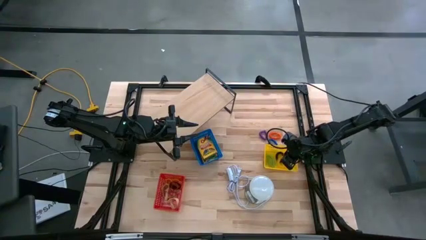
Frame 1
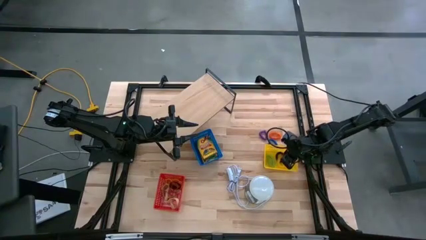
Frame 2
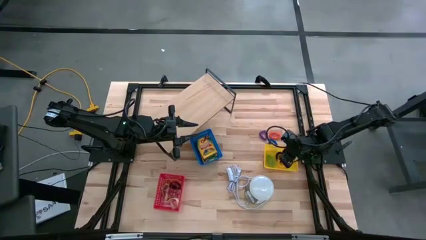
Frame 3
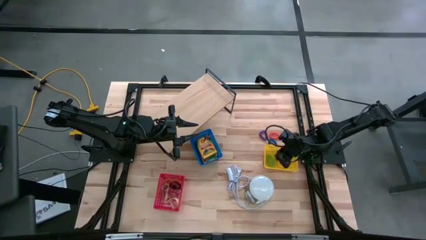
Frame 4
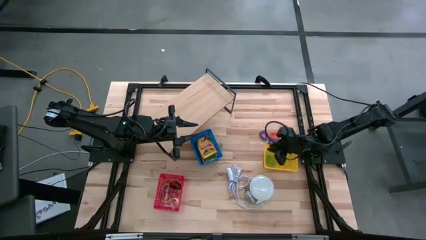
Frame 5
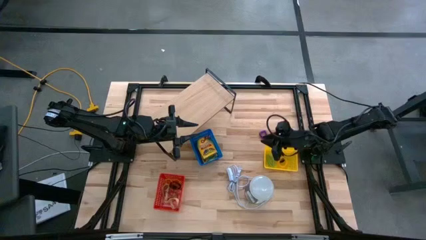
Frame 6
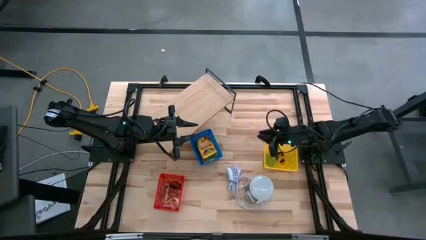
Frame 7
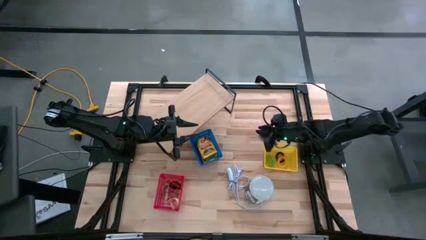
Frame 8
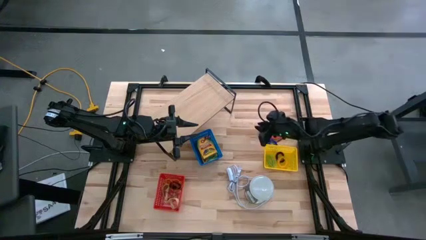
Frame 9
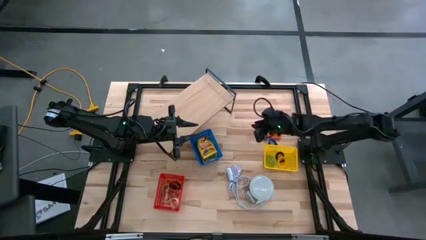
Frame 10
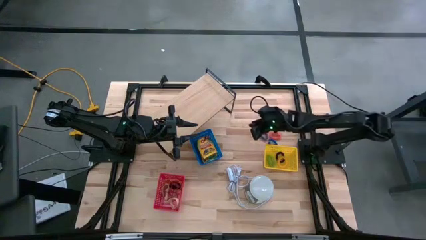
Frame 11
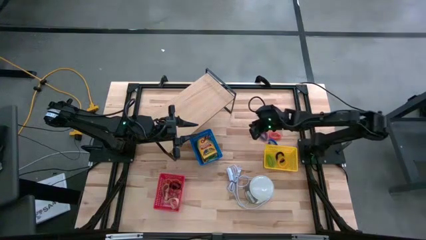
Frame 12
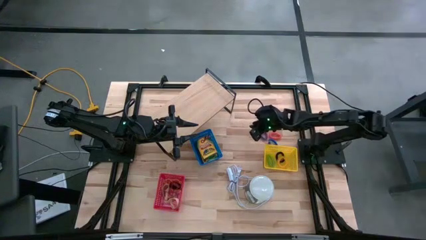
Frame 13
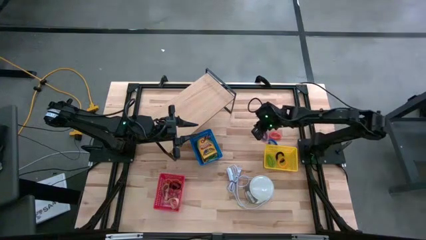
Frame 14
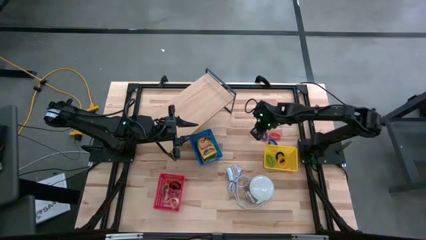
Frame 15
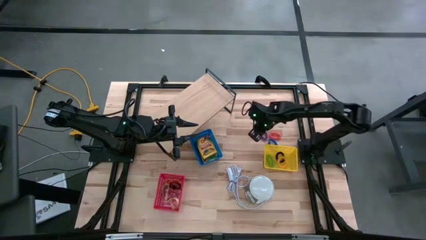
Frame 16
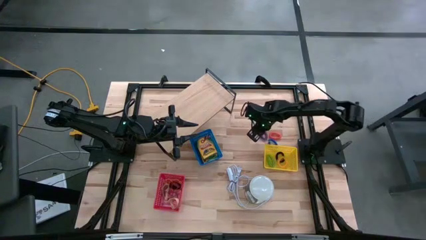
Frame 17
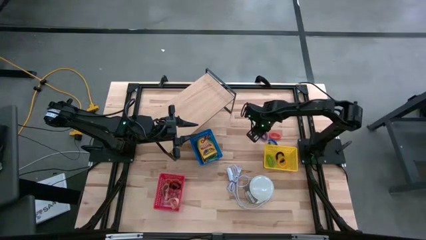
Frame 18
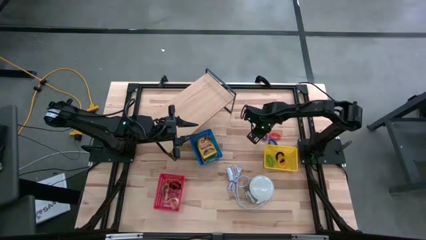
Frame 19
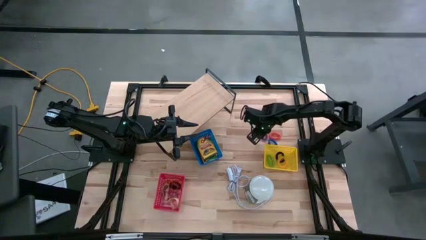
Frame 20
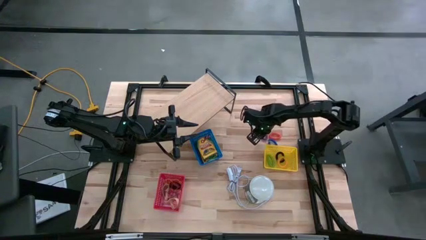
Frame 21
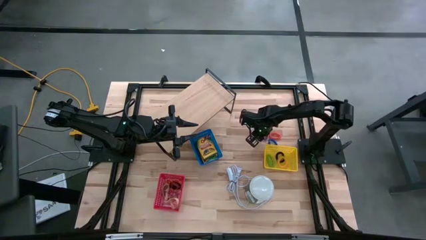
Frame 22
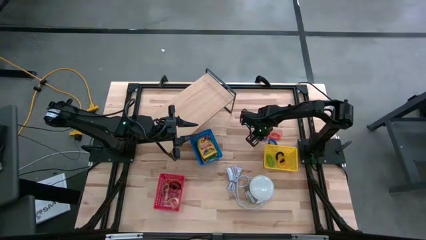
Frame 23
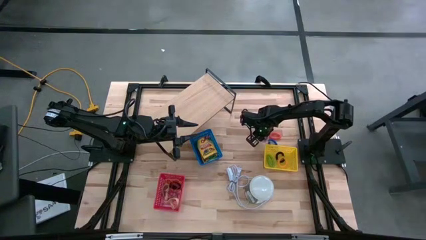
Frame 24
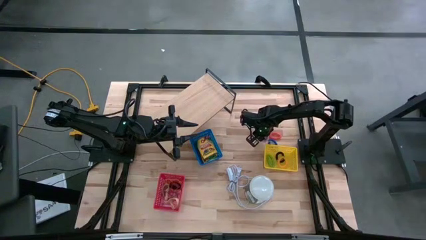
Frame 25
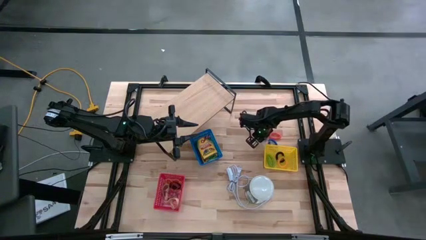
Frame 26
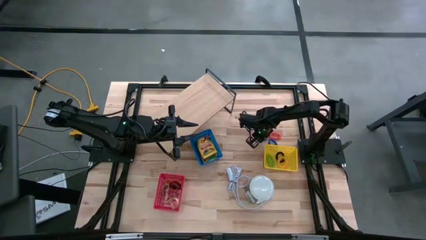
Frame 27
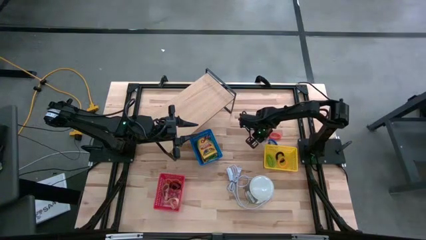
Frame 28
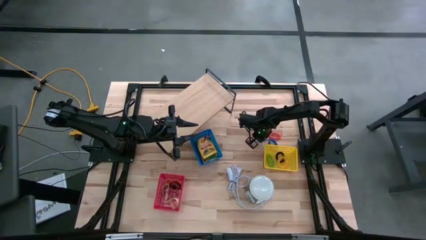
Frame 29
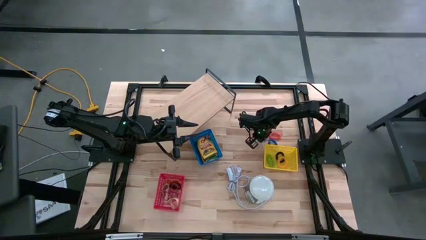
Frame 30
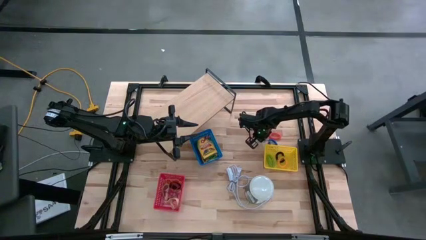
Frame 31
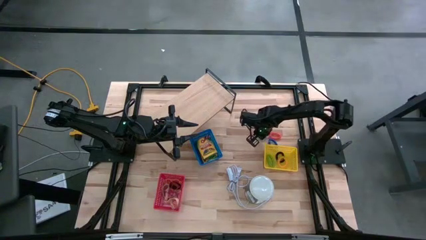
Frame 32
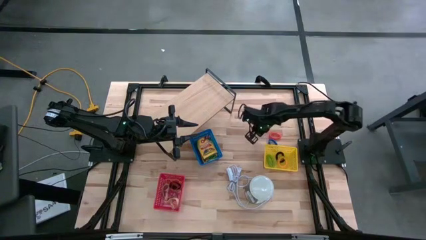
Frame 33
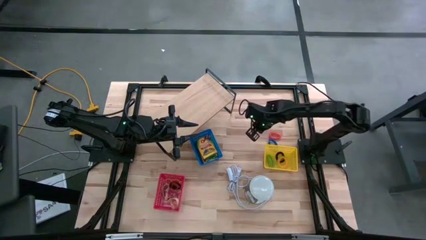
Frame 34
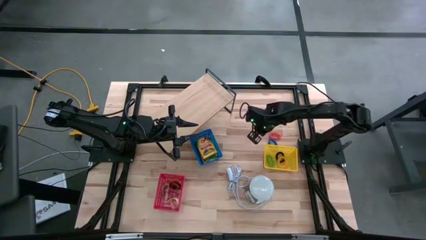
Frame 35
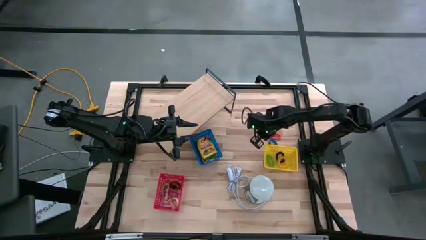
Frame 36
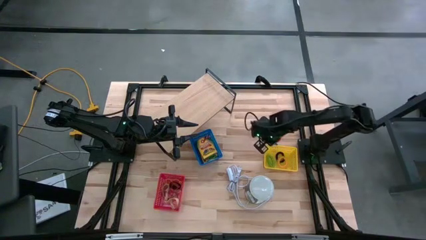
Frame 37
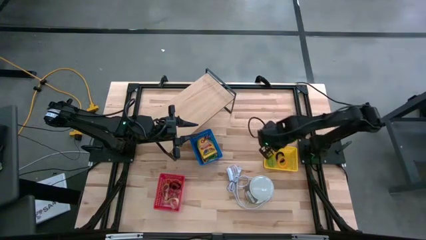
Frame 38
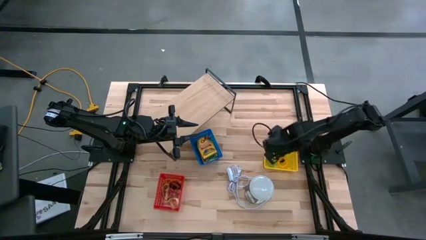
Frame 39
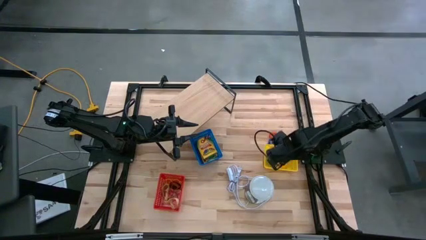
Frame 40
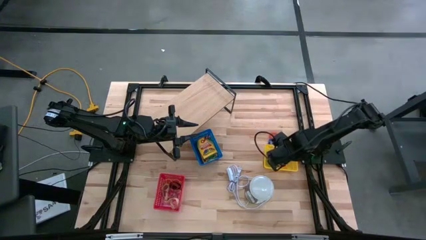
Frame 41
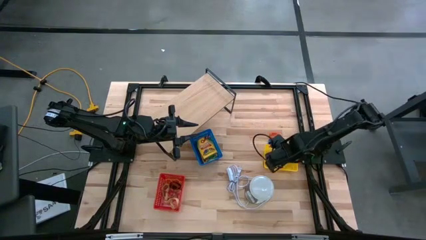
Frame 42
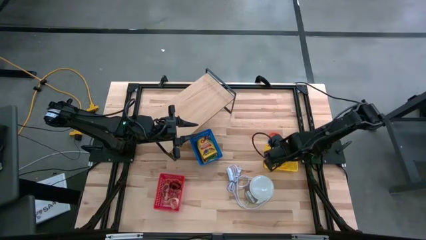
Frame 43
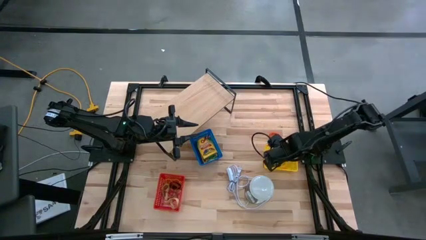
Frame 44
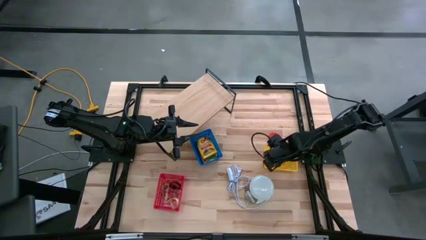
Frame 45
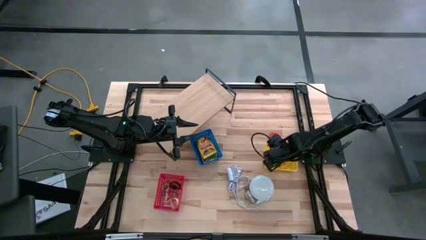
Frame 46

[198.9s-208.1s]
Task: Pick & Place Office Desk Supplies
Put the violet spring keychain into the yellow bin

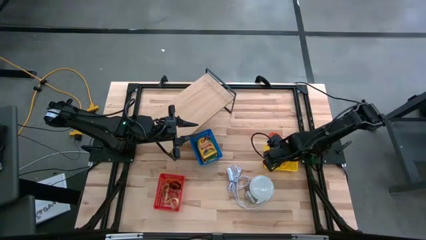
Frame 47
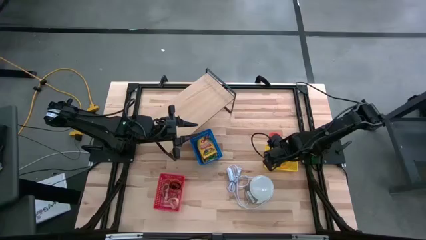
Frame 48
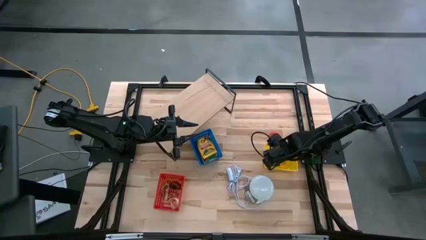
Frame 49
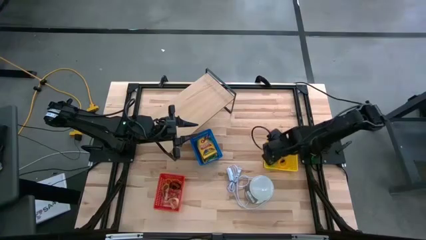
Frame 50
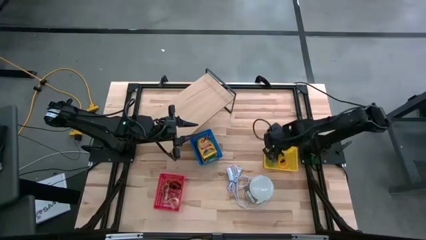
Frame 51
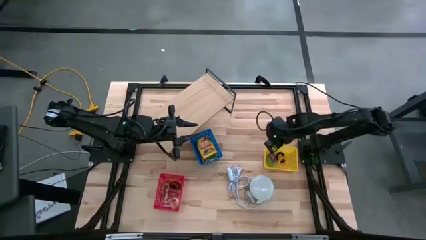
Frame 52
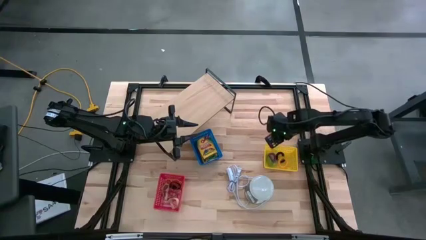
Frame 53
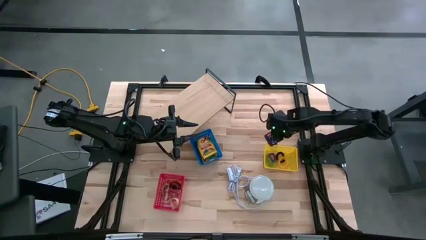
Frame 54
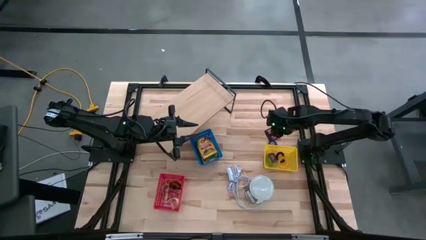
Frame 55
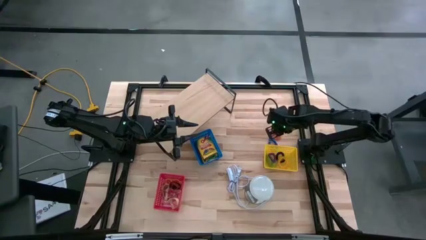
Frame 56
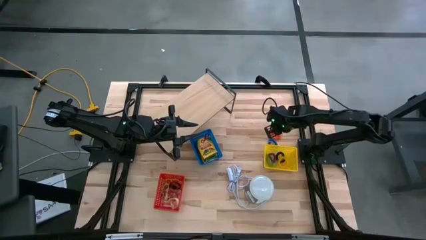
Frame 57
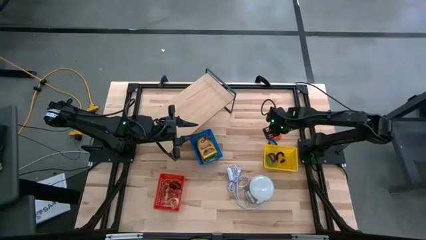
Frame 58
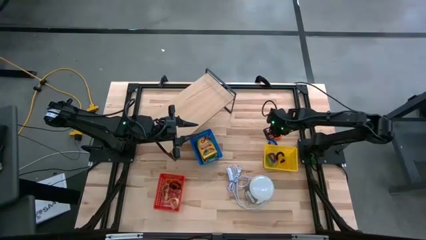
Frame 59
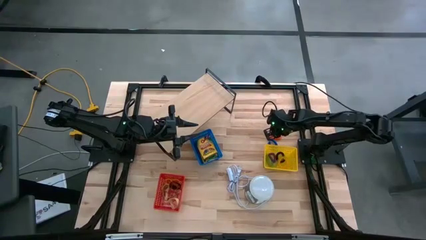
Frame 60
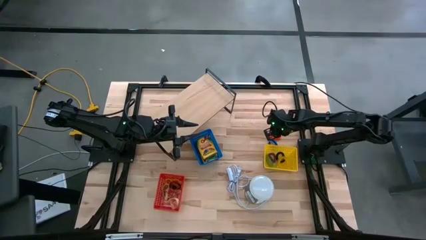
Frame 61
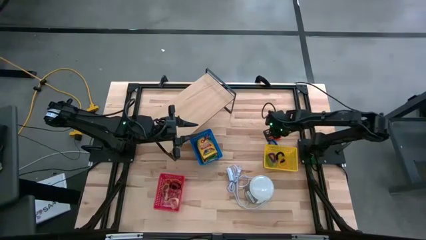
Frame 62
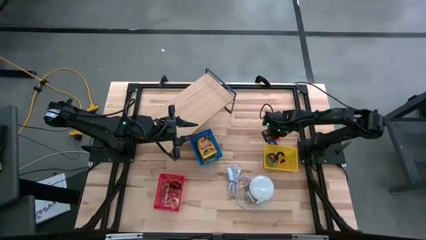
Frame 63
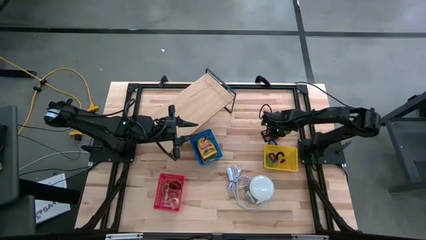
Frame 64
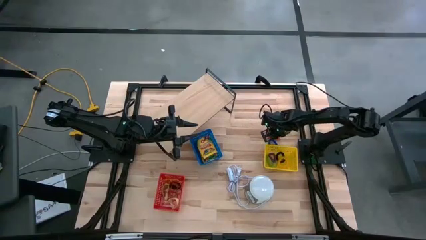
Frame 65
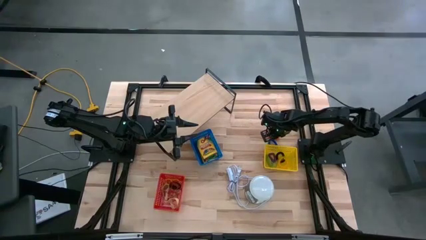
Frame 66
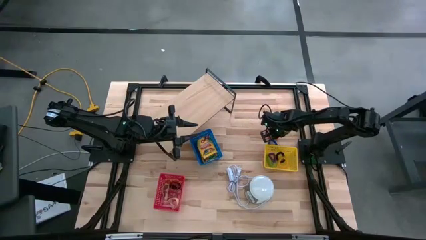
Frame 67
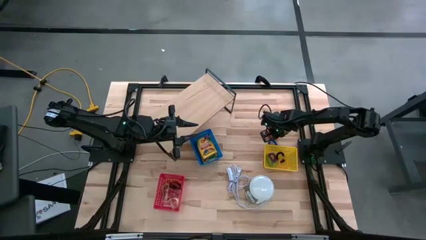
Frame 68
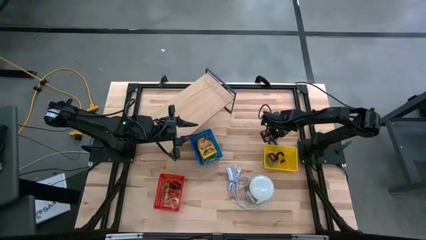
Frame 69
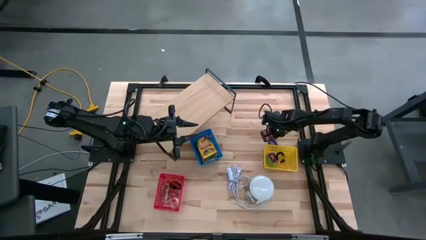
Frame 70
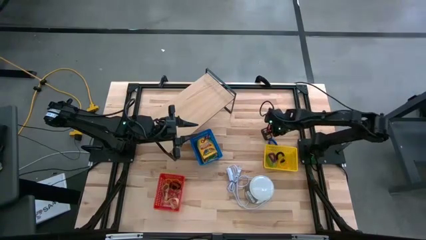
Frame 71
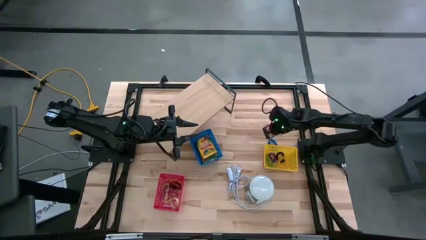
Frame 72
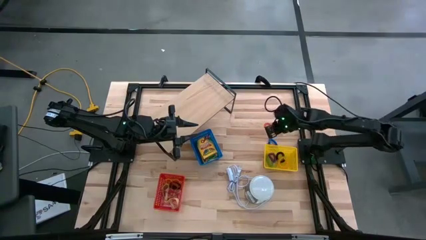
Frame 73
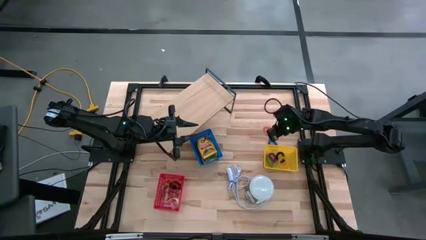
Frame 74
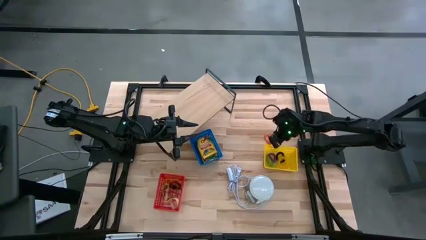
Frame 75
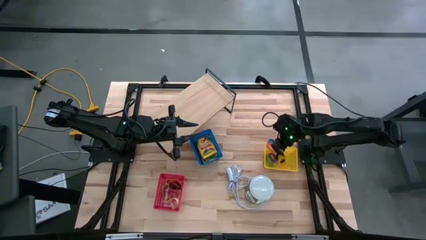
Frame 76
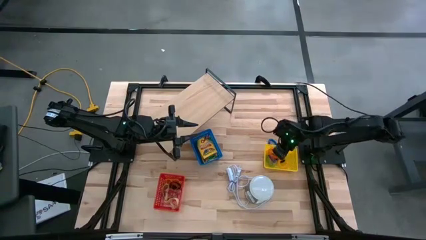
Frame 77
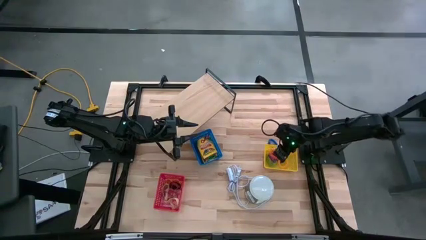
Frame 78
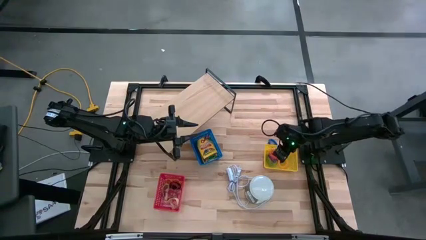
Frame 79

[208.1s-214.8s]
Put the orange spring keychain into the yellow bin

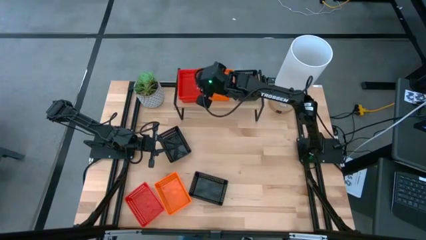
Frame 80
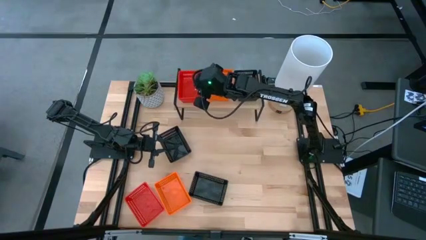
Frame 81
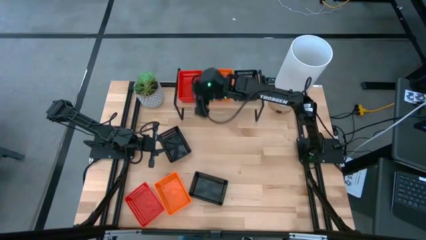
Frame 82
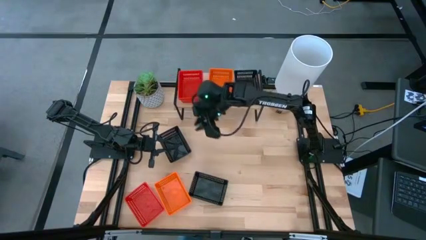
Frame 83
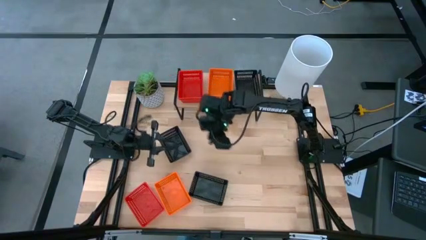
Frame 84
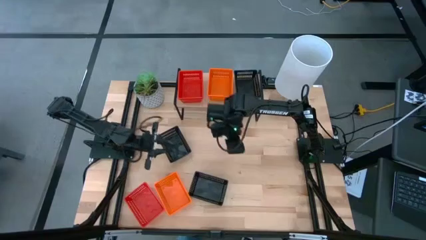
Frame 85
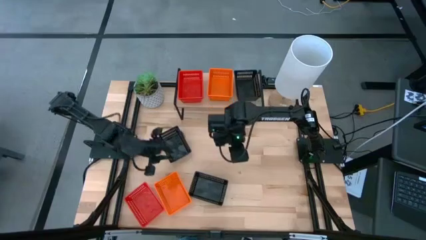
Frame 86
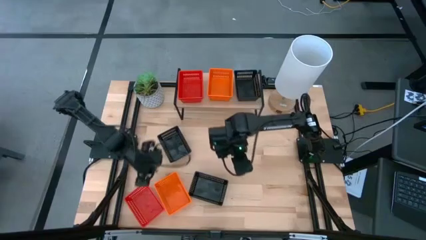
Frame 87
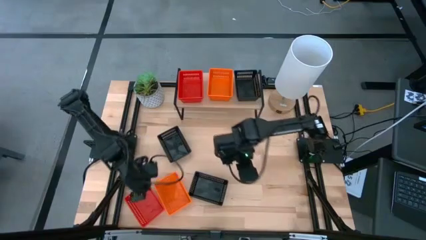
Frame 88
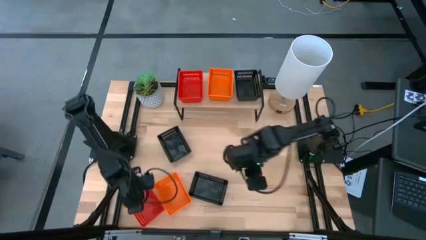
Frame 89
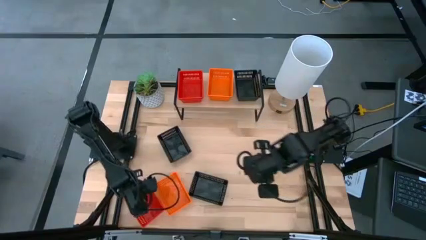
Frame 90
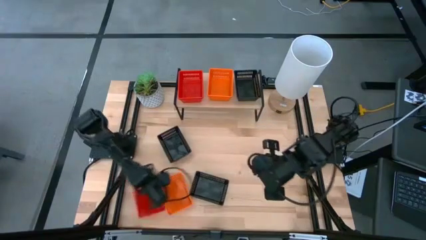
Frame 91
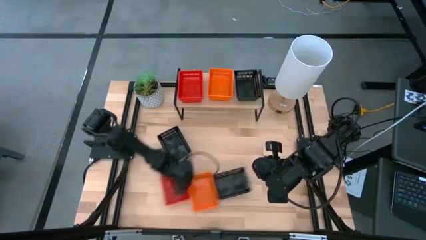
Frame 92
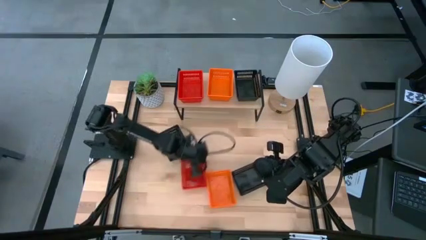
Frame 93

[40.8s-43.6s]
Task: Stack baskets on shelf by color
Move the red baskets to the center of the table
